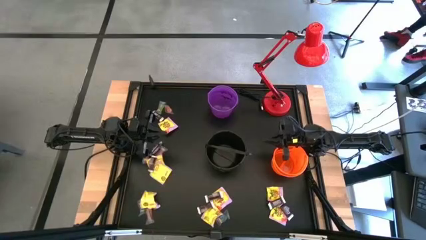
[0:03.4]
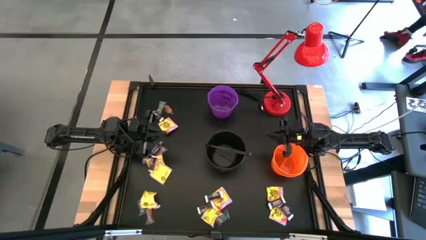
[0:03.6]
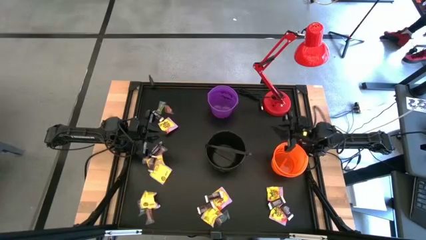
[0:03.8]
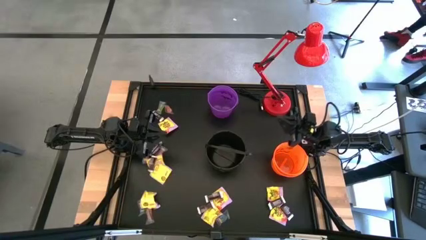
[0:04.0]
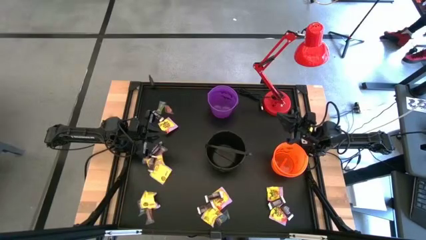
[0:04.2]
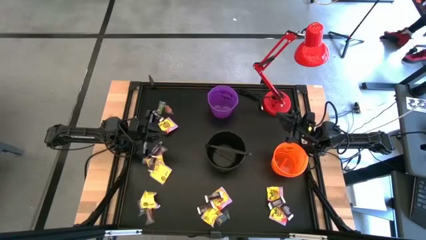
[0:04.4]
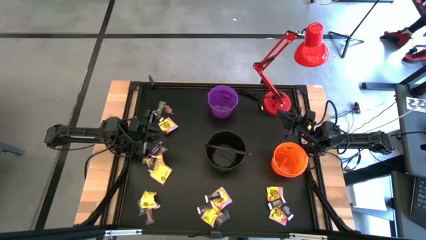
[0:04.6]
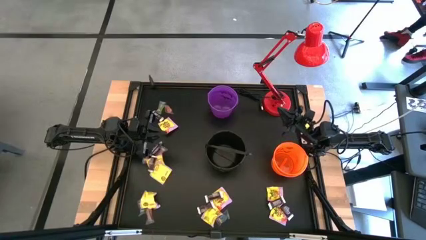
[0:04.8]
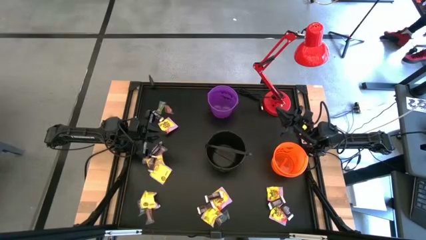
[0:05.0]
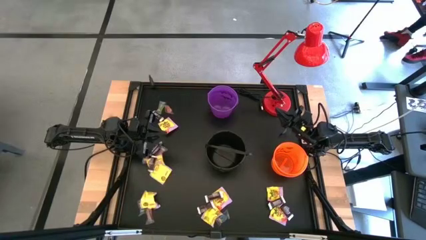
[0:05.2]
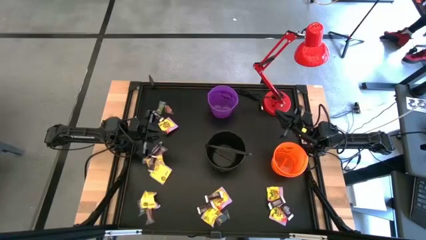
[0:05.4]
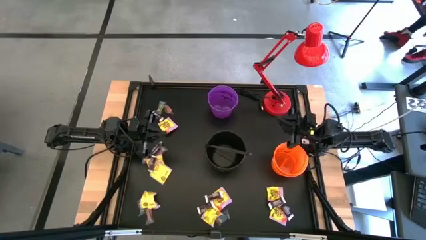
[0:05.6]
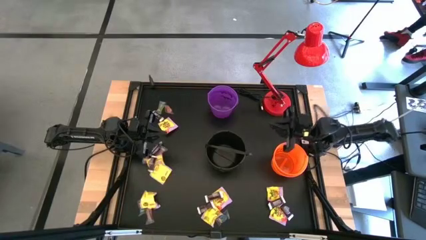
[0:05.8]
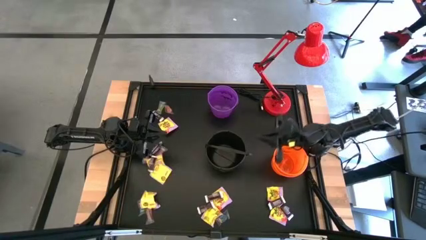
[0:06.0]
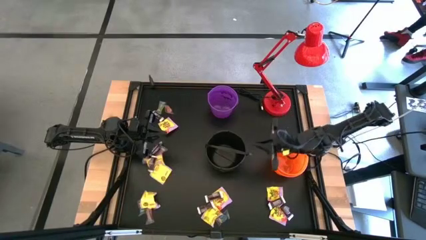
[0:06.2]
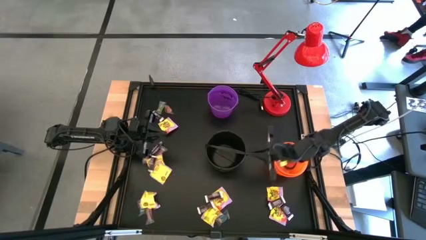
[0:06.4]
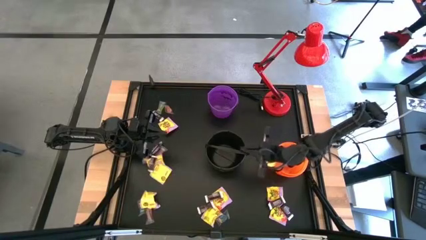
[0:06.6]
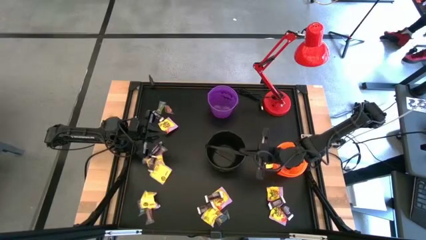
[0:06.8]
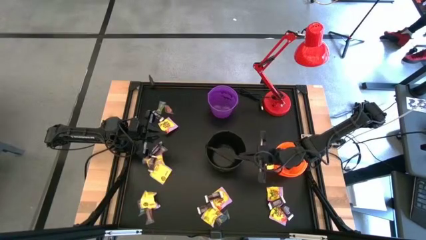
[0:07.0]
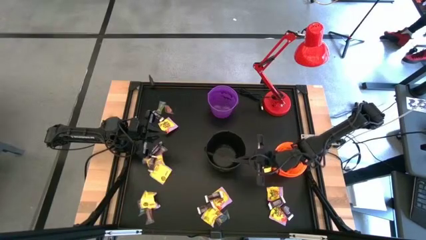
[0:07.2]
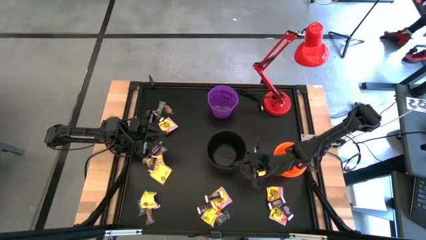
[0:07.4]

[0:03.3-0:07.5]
Task: Sort candy
Adjust the black bucket

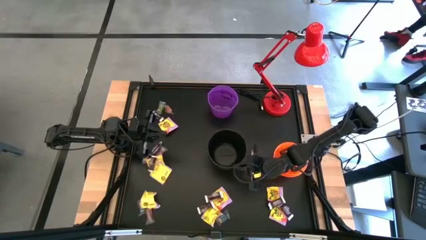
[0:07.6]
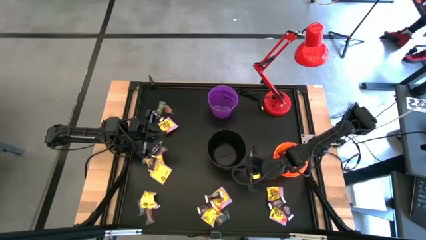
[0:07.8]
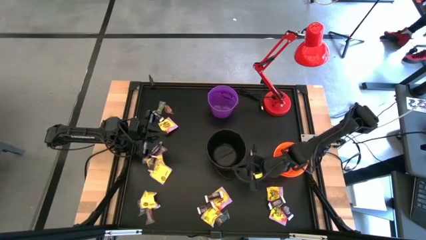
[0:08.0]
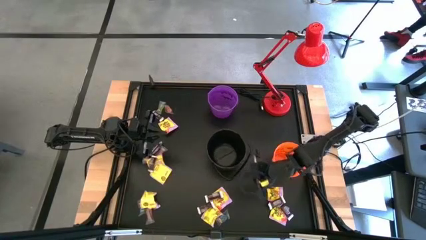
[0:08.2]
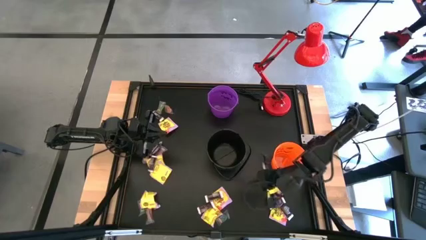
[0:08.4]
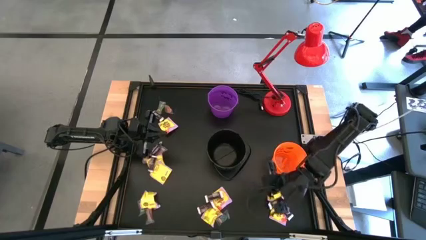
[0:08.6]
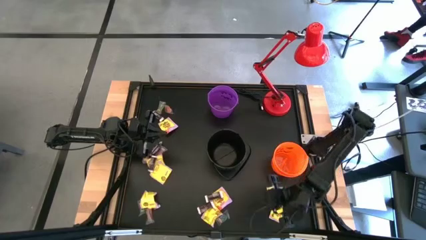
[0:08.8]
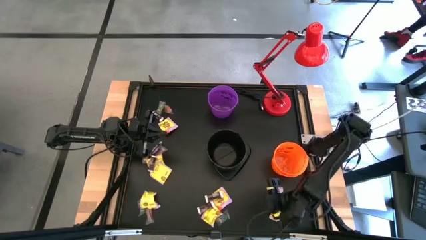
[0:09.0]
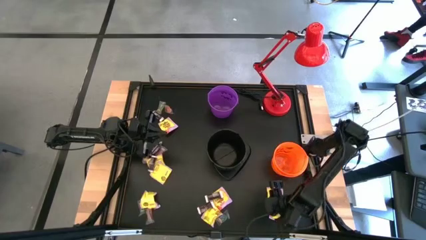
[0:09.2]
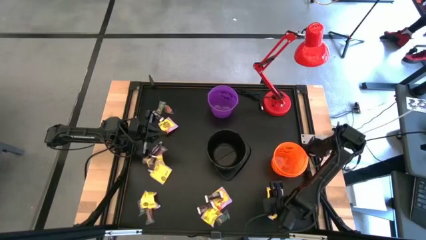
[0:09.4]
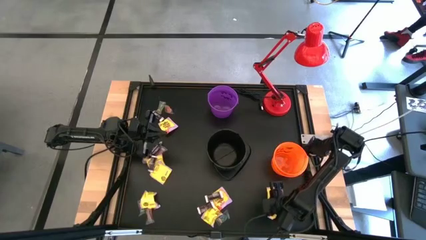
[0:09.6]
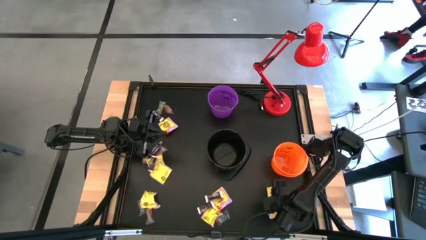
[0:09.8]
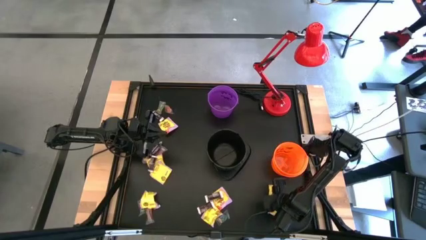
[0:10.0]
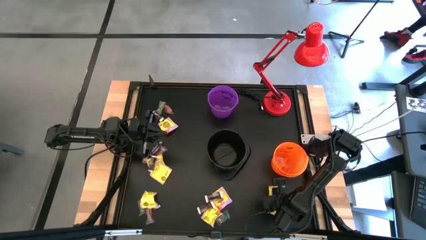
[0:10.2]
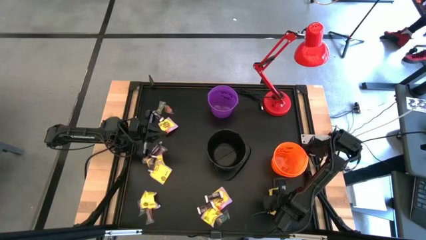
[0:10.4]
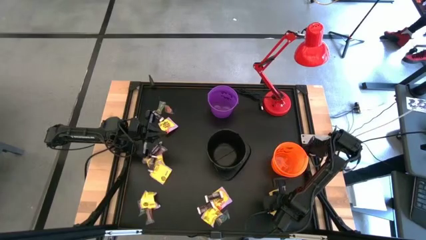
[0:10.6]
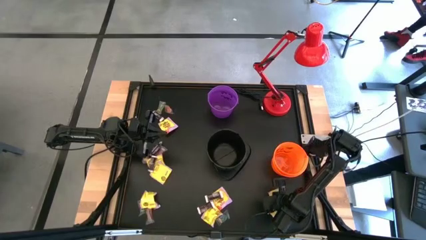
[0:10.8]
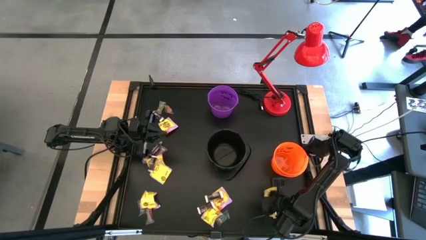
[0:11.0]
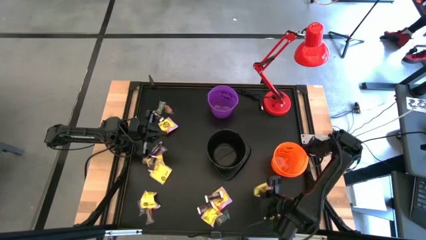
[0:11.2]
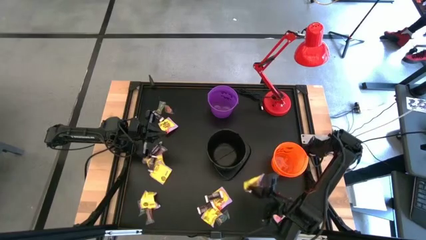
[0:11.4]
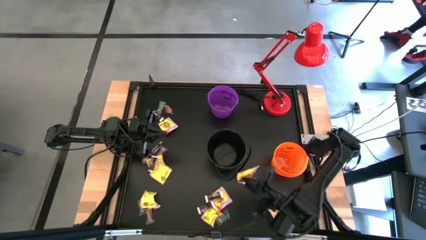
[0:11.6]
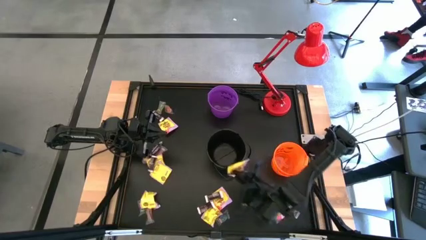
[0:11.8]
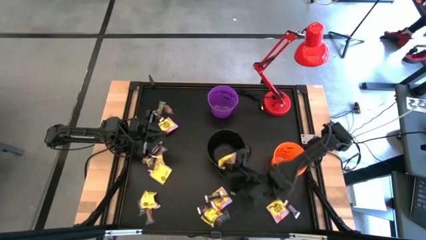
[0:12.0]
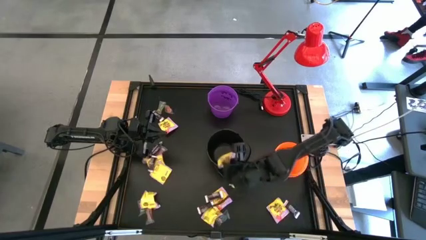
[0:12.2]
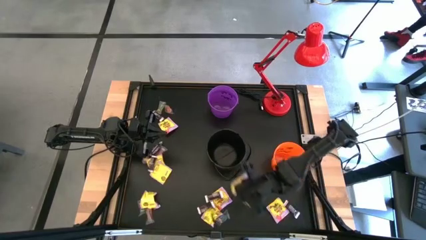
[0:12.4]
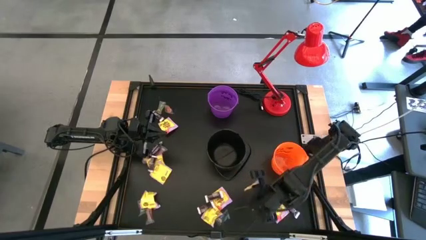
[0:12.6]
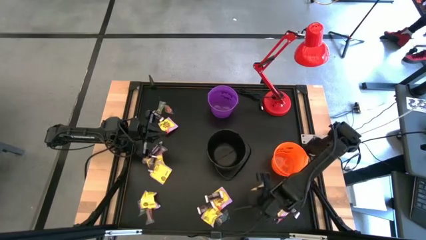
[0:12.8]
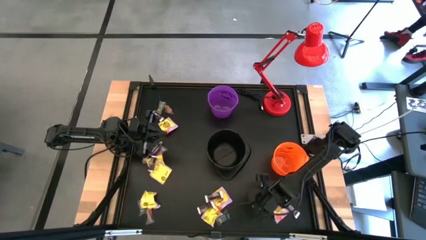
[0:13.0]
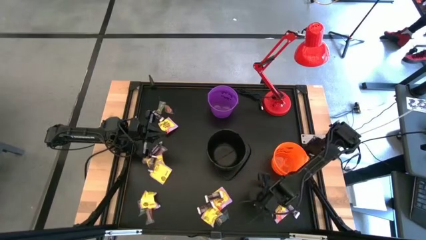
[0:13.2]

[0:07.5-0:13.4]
Put the brown chocolate into the black bucket

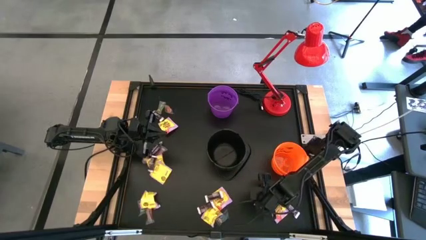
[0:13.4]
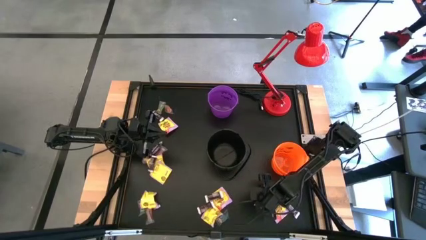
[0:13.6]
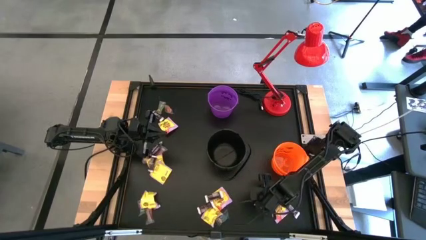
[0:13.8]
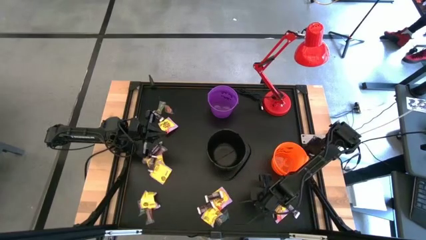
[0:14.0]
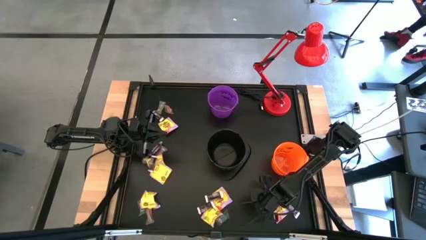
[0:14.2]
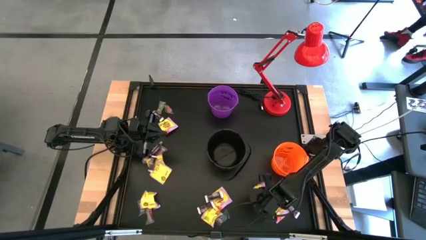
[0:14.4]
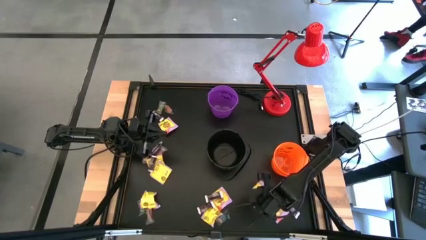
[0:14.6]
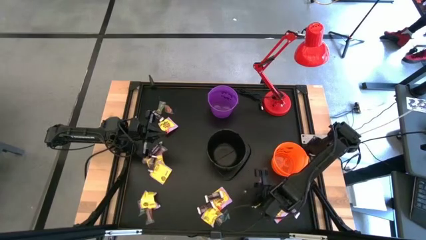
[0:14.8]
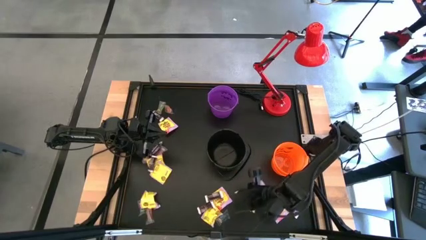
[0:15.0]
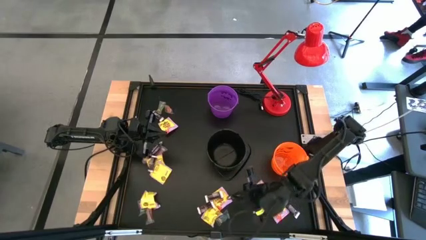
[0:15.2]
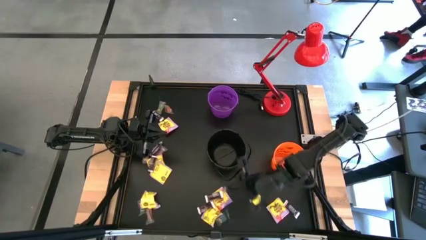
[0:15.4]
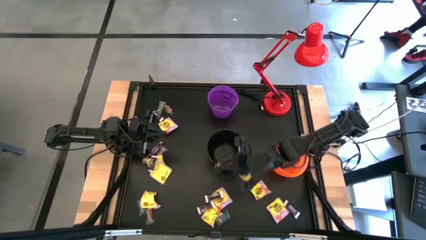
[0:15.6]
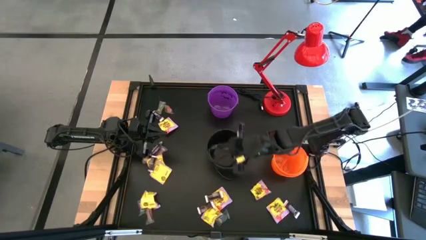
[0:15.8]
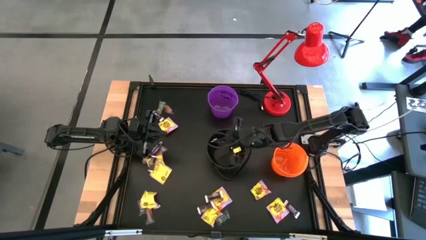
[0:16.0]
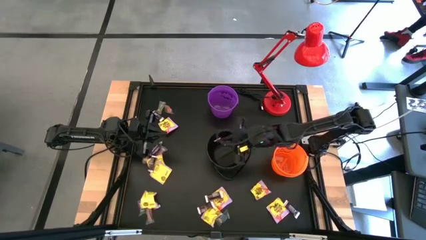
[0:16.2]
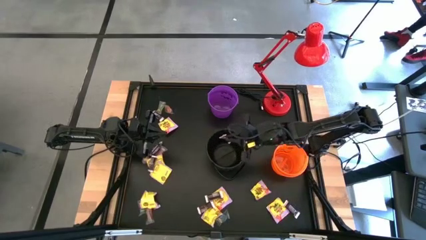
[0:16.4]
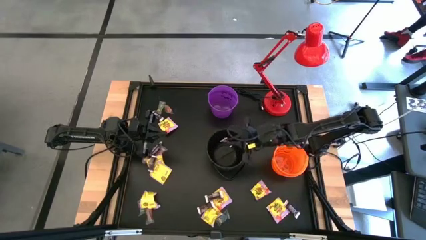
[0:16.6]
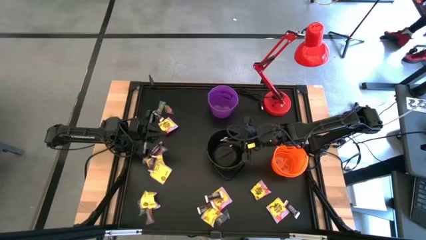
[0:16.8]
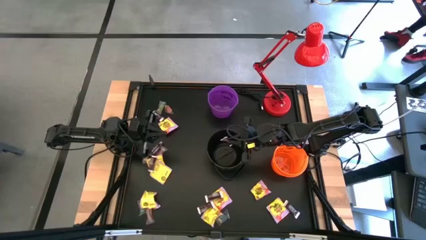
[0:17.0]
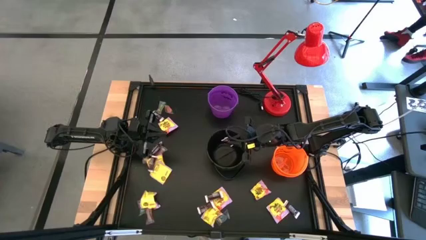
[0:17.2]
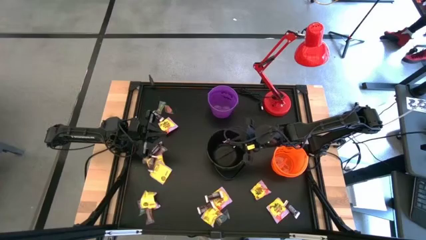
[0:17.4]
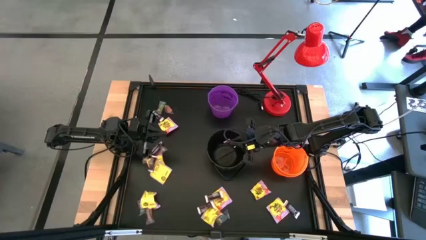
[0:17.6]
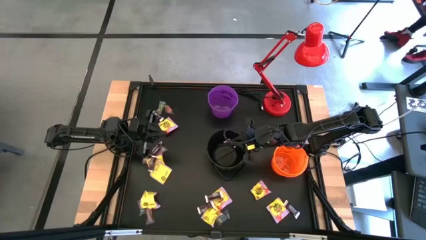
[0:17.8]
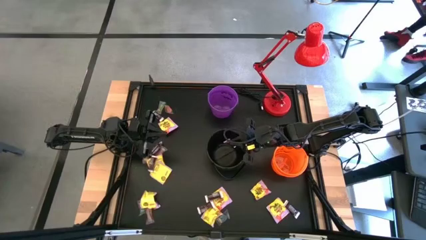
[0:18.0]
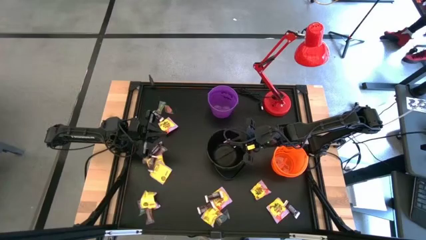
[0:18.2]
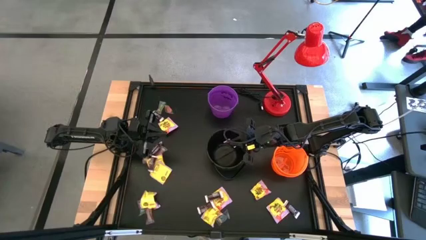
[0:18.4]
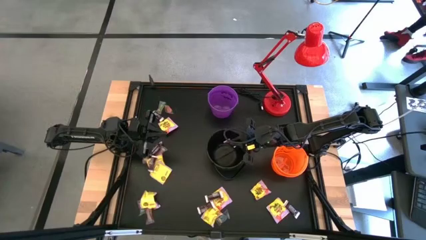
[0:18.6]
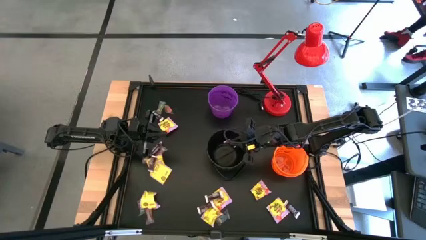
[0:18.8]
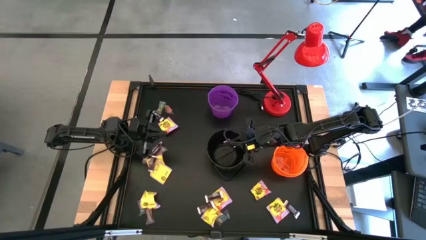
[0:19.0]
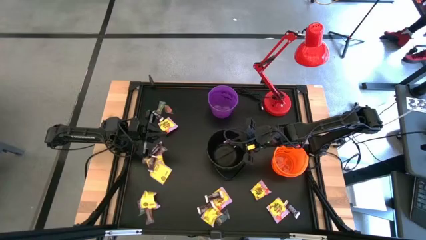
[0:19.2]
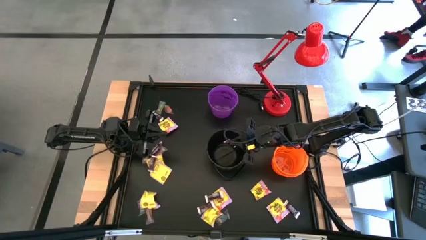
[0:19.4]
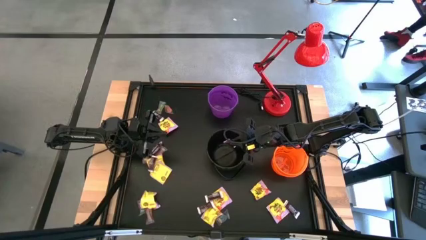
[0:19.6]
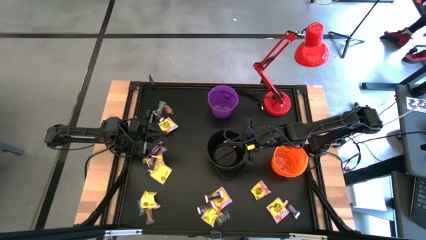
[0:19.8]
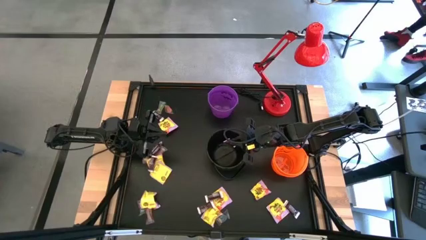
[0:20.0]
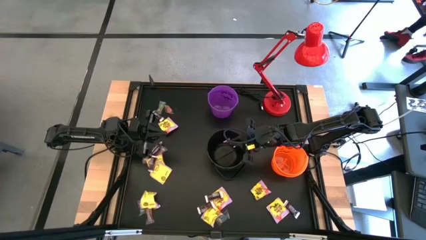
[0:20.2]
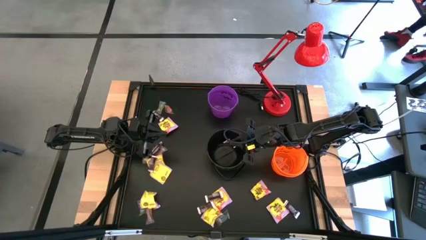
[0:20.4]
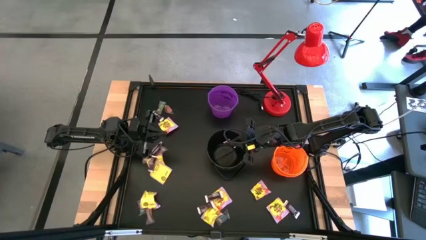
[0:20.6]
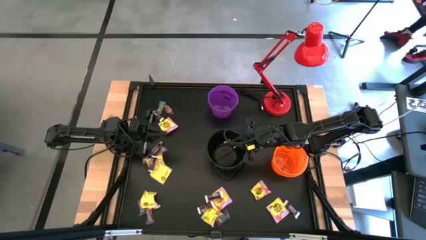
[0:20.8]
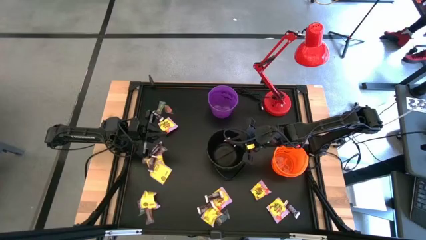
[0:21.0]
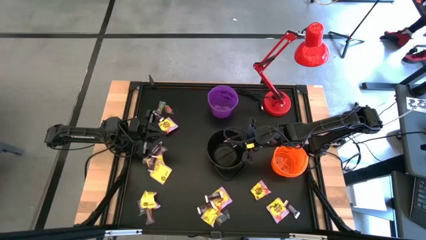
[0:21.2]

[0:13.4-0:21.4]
Put the brown chocolate into the black bucket
